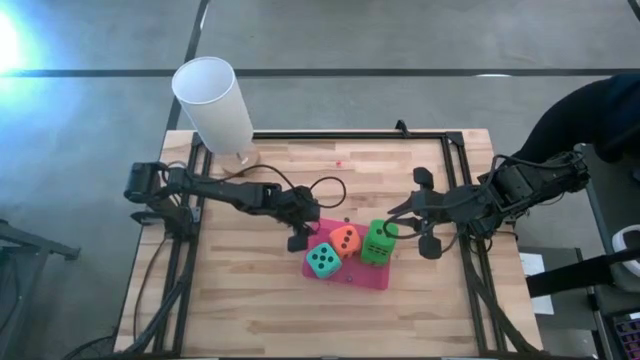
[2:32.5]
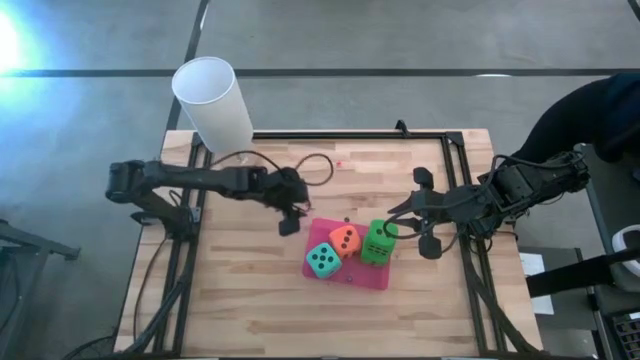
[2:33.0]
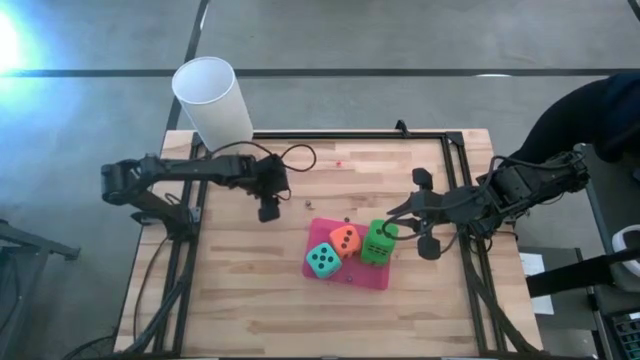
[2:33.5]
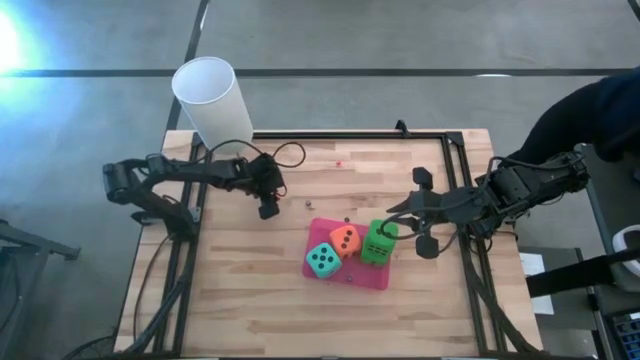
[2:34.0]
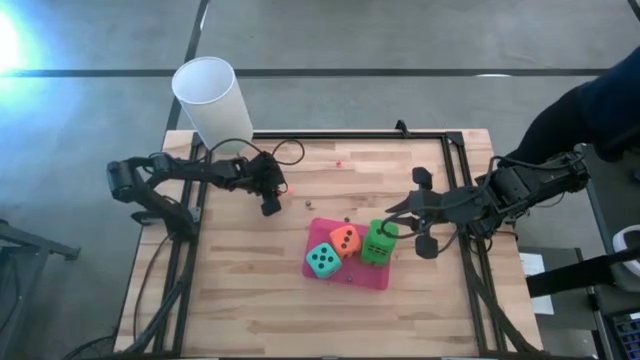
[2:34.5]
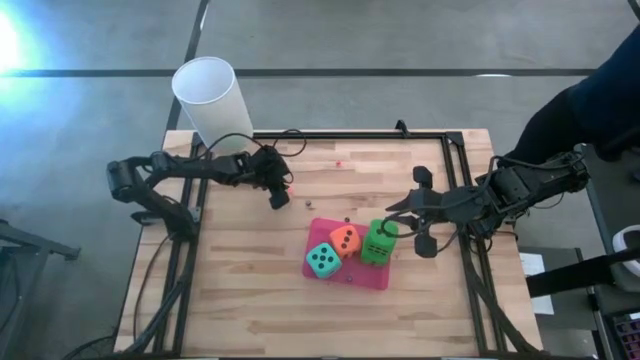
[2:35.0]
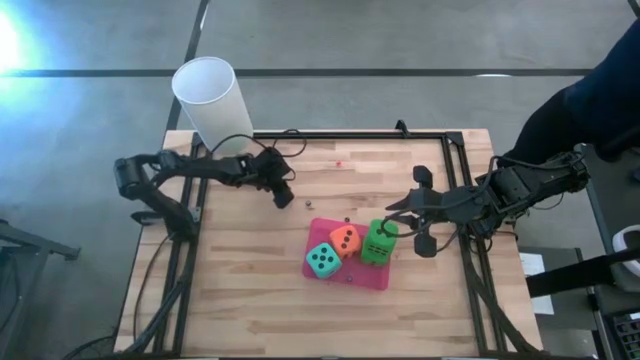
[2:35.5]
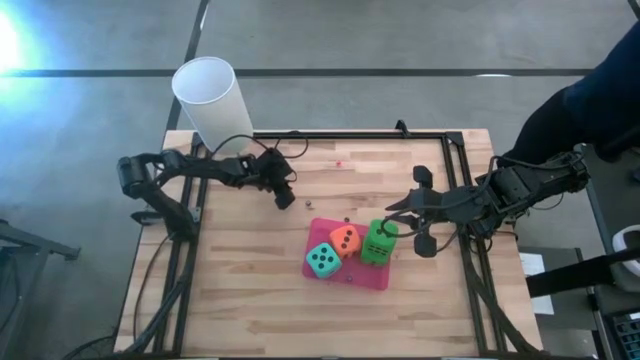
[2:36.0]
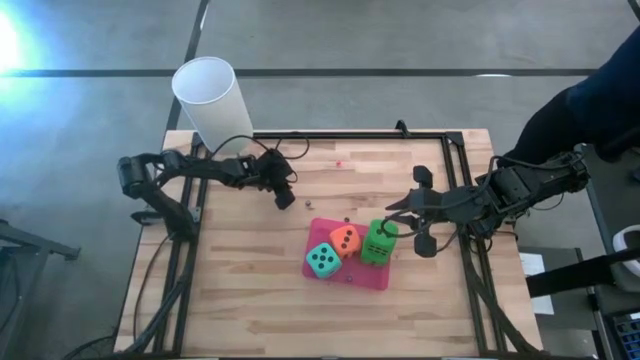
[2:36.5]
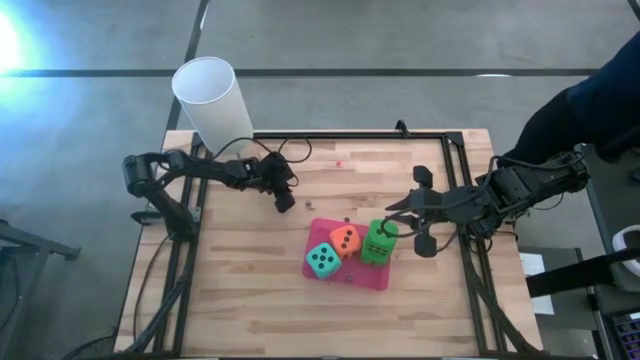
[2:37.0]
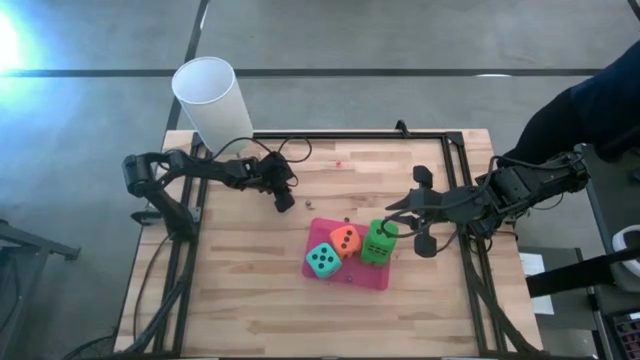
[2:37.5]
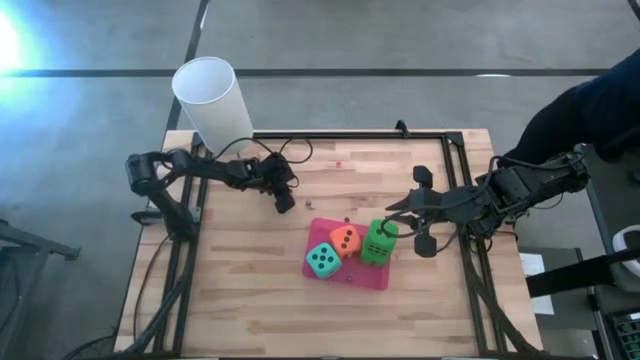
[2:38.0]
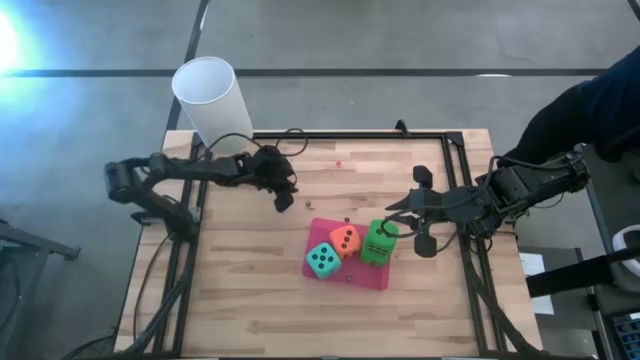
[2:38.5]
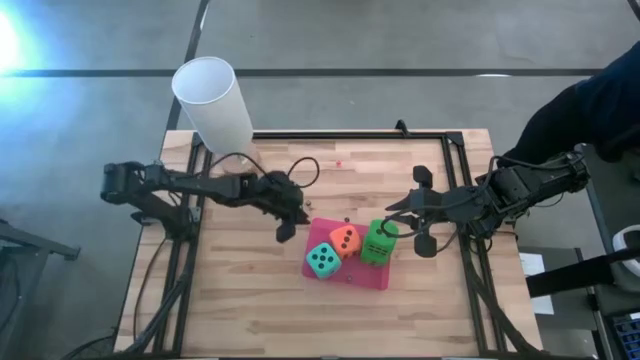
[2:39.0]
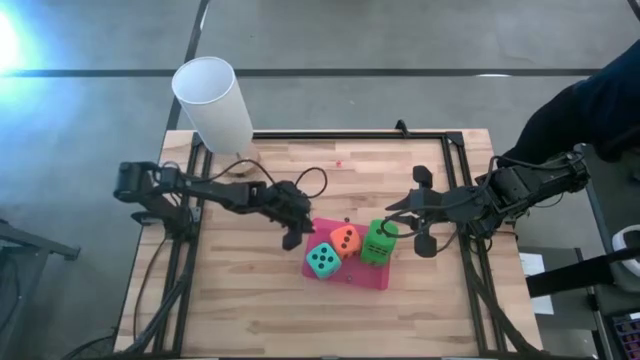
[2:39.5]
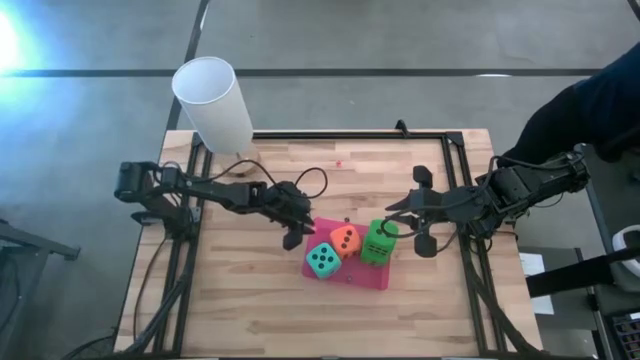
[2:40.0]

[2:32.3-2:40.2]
Task: Pick & Place Dice
Put the small orange dice into the pink bin

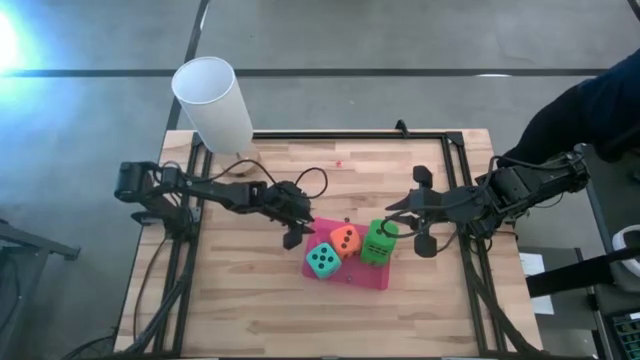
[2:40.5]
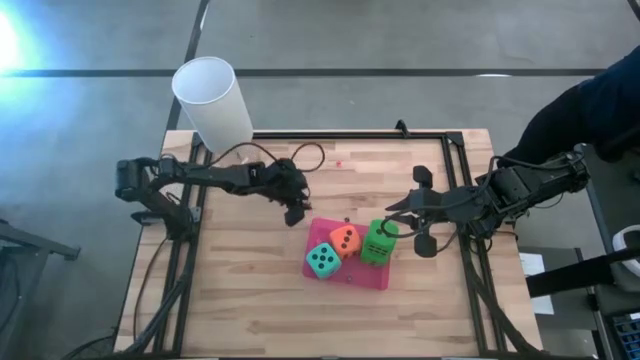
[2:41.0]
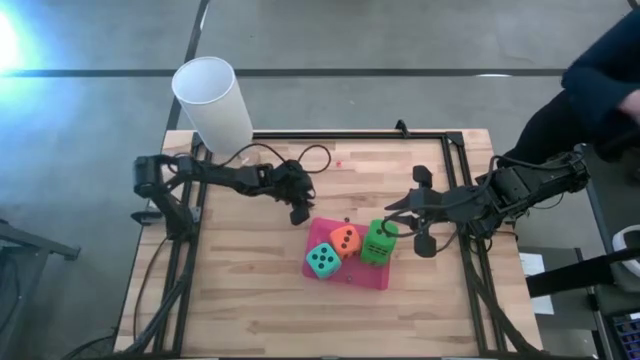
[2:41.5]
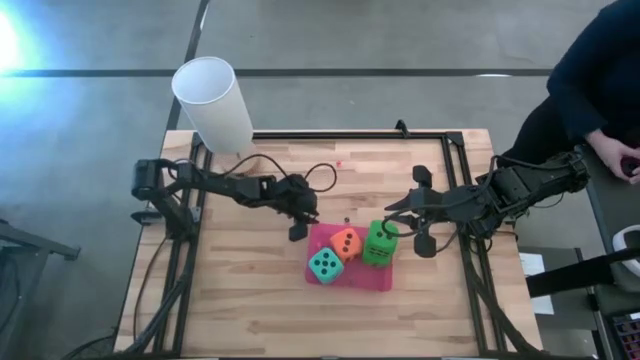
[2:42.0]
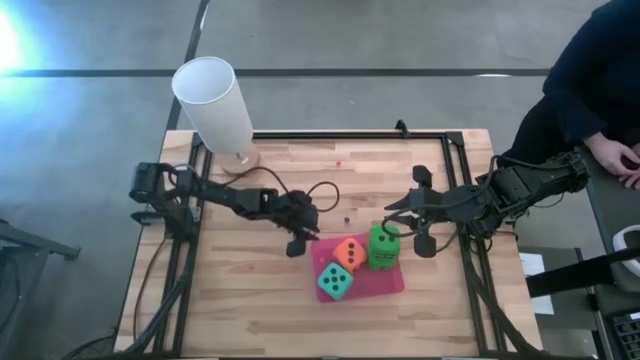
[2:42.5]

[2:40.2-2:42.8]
Adjust the pink bin

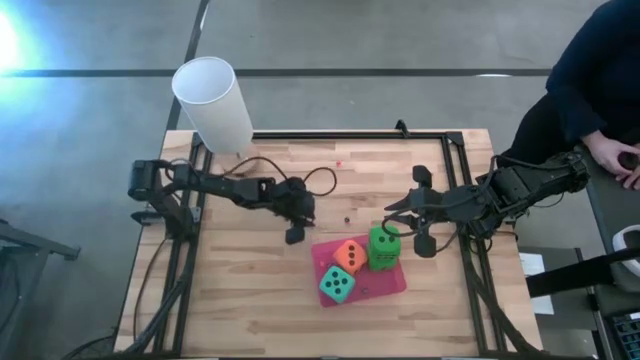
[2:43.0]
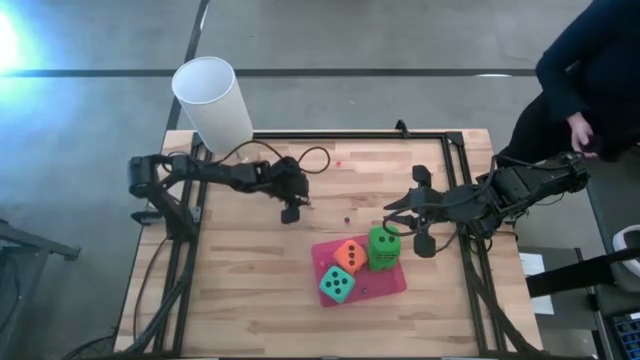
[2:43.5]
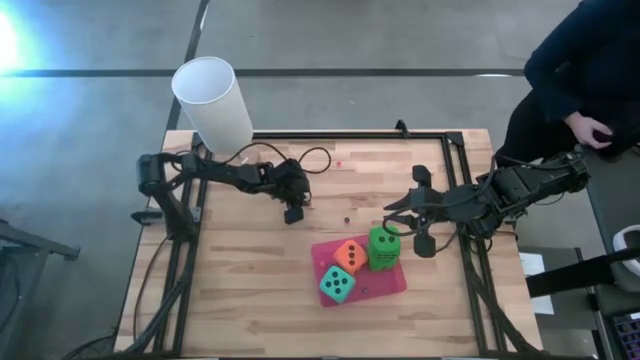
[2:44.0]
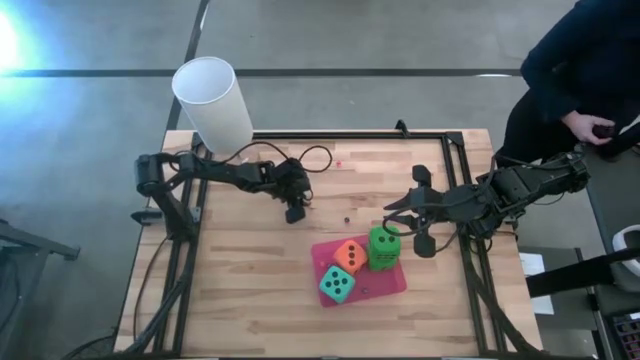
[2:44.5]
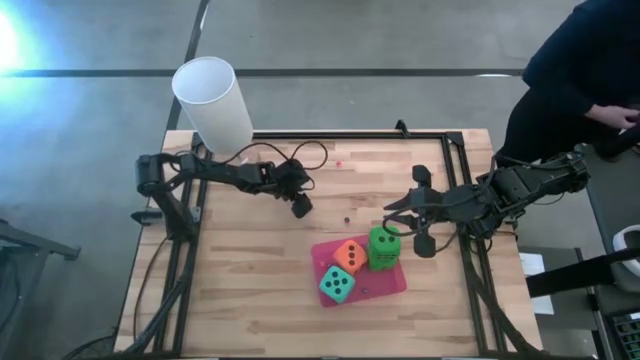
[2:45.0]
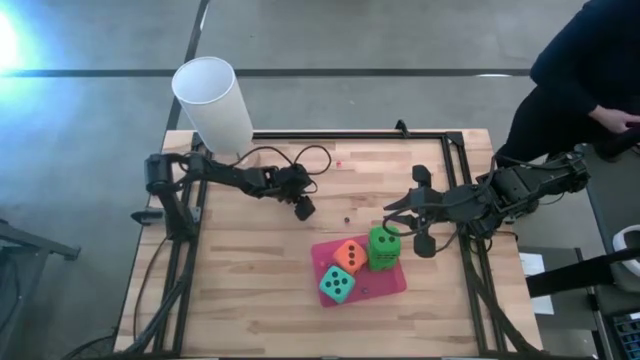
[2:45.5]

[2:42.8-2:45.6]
Put the left small black dice into the pink bin

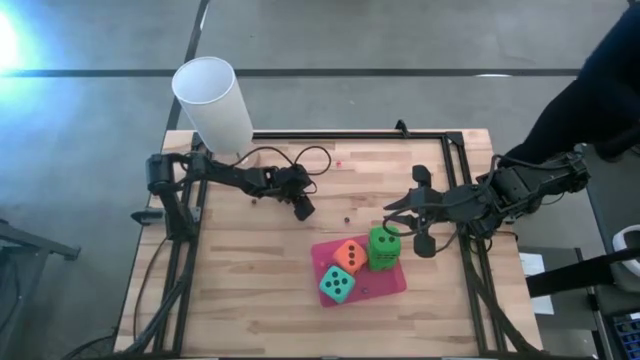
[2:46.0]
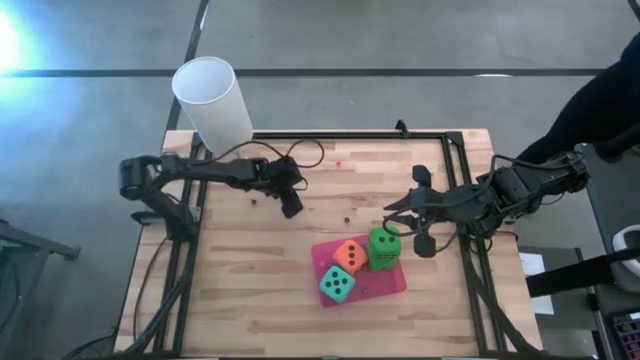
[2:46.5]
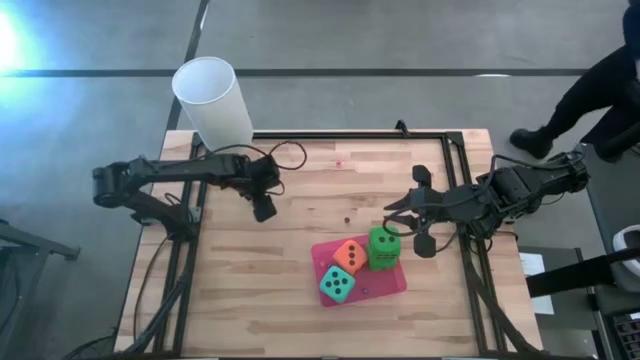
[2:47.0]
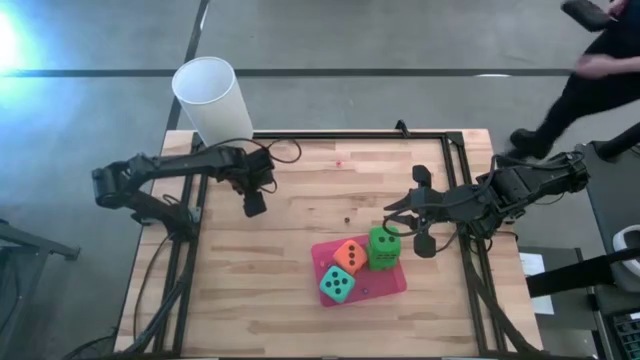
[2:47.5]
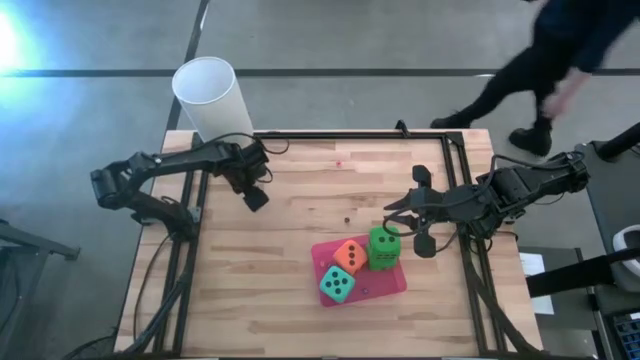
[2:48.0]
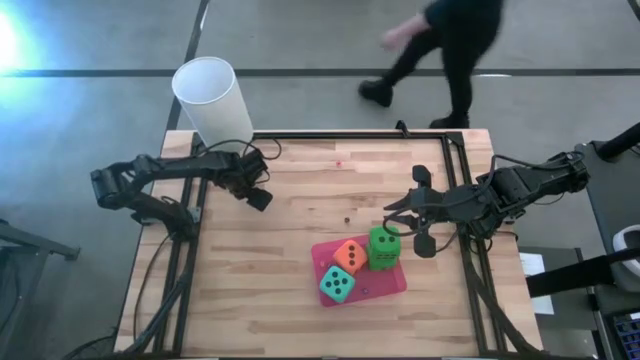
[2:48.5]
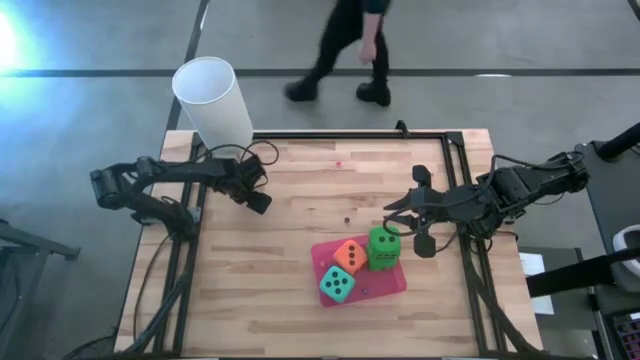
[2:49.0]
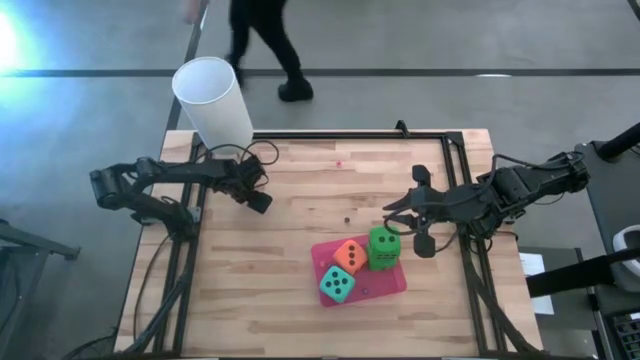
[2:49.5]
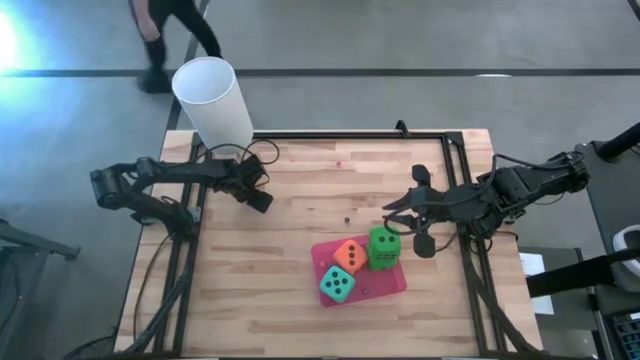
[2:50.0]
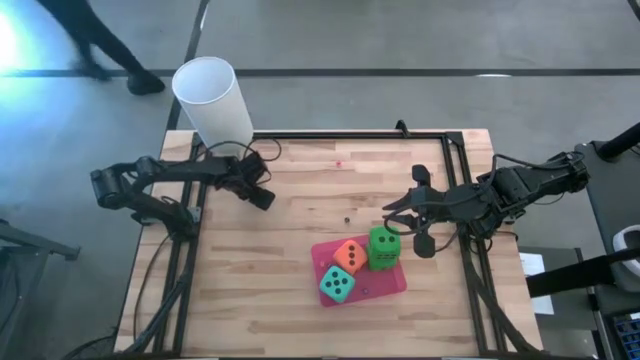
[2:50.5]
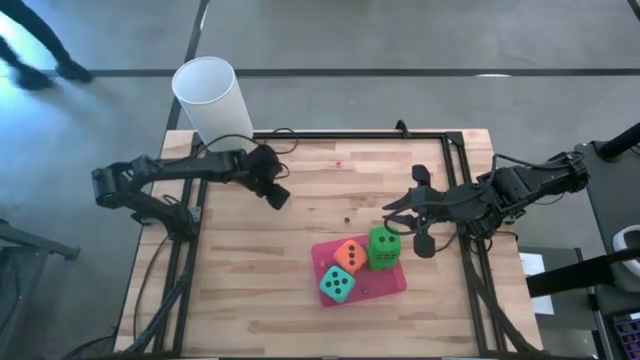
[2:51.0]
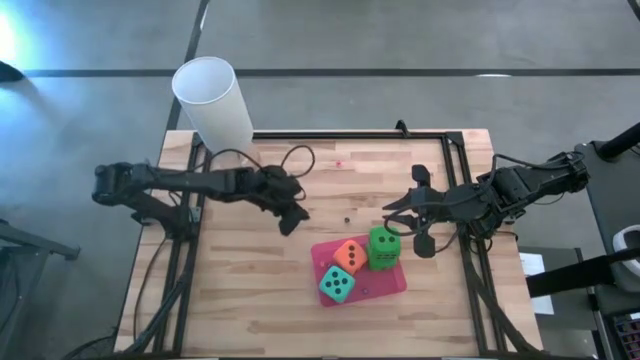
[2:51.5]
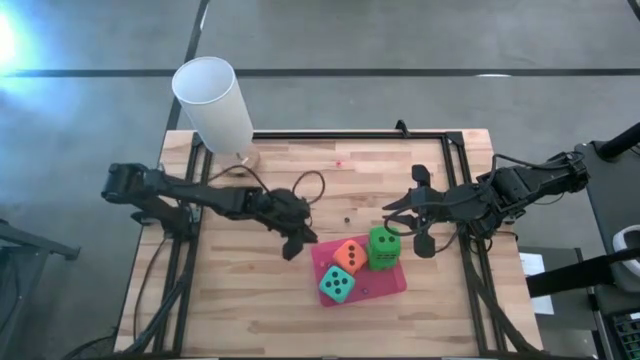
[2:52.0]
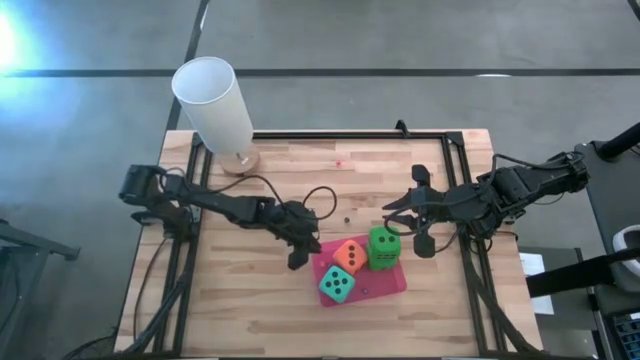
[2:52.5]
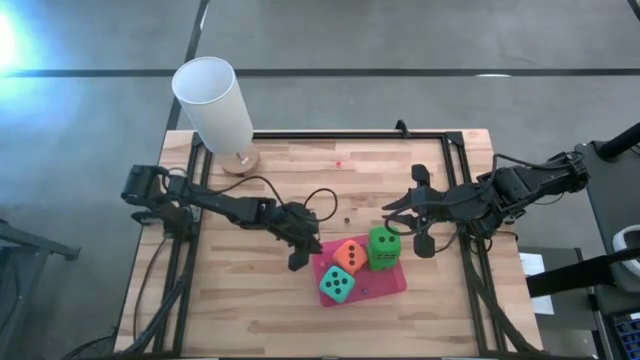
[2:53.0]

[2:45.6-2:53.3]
Put the left small black dice into the pink bin

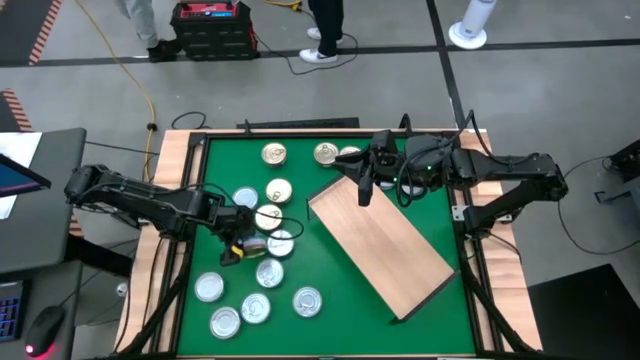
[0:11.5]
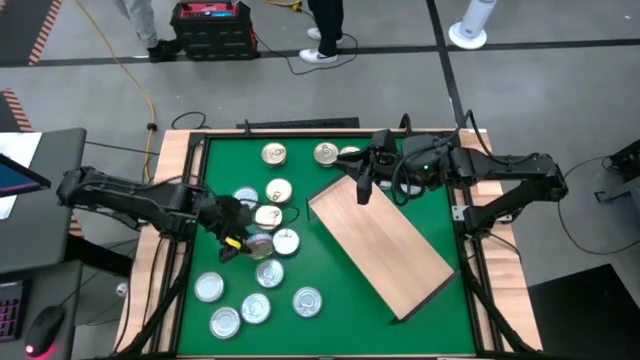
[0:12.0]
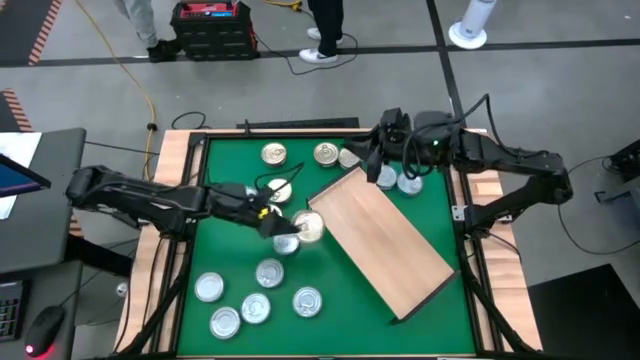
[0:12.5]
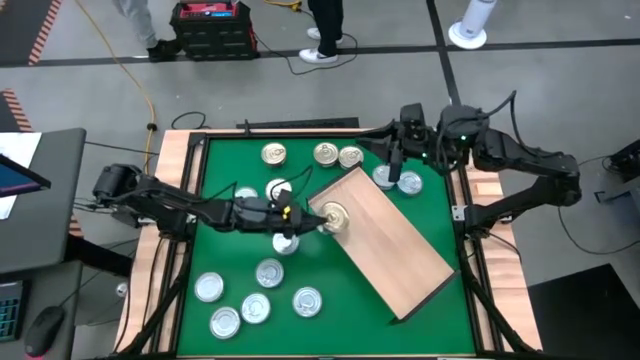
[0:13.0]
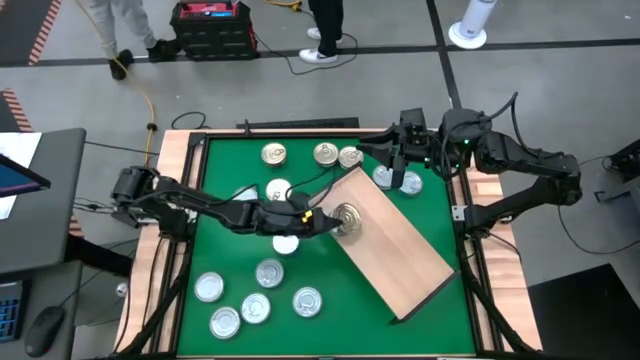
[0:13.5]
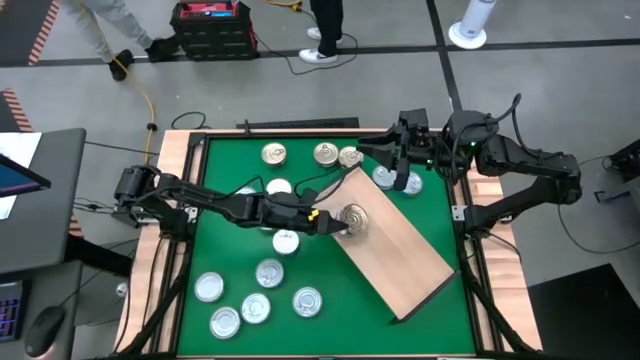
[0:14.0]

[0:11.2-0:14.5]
Task: Stack canned seafood by type on shelf
Put the blue and pink tuna can on the shelf
